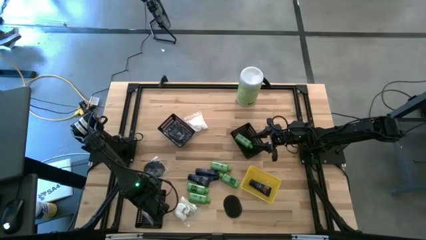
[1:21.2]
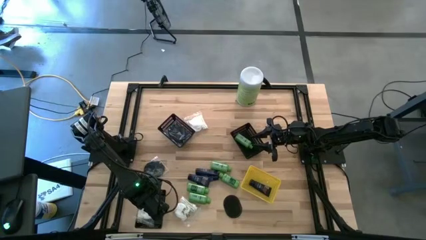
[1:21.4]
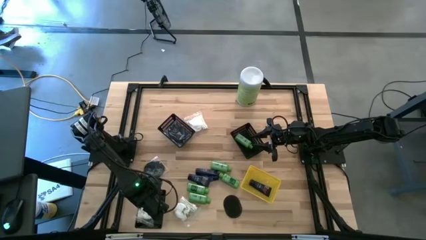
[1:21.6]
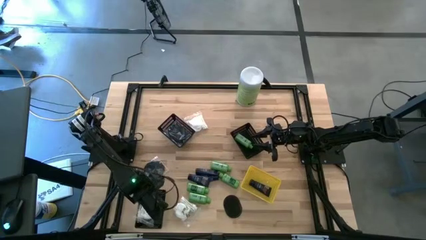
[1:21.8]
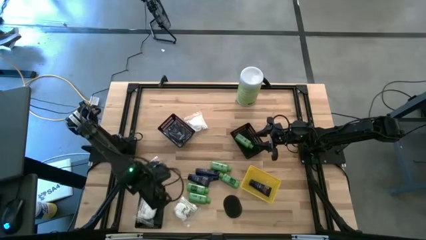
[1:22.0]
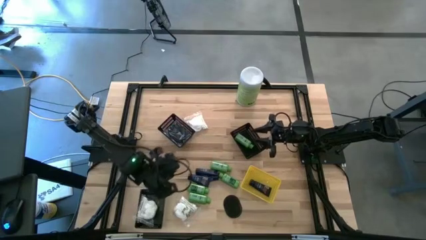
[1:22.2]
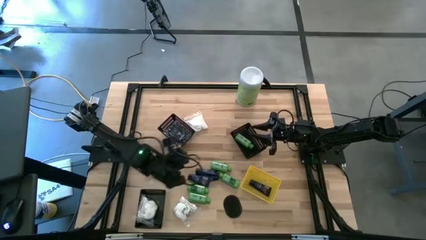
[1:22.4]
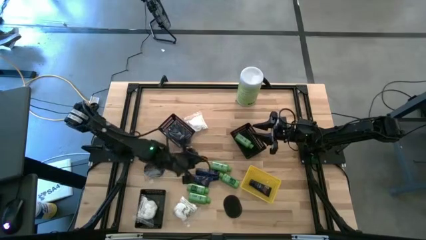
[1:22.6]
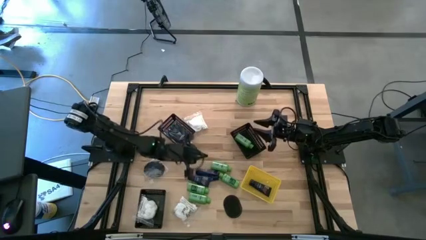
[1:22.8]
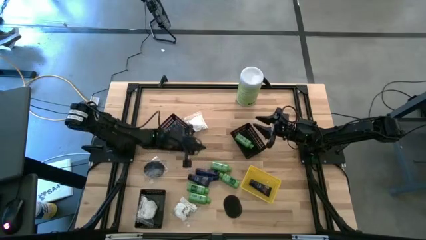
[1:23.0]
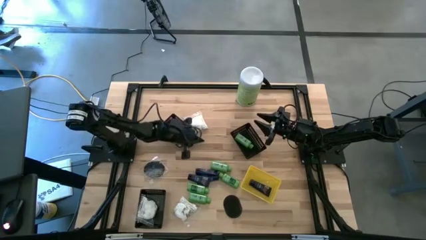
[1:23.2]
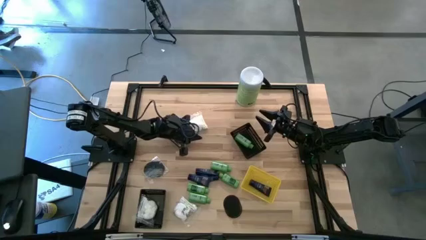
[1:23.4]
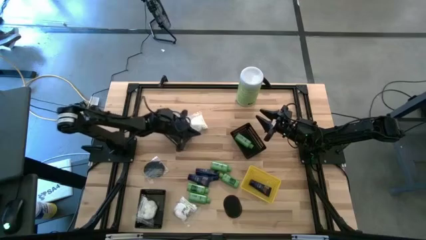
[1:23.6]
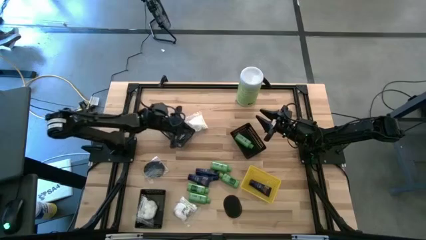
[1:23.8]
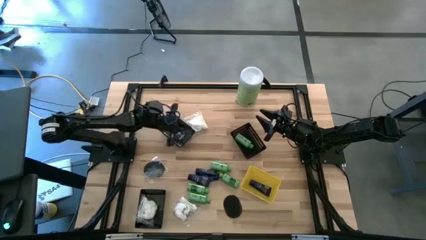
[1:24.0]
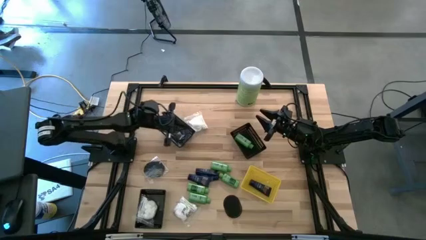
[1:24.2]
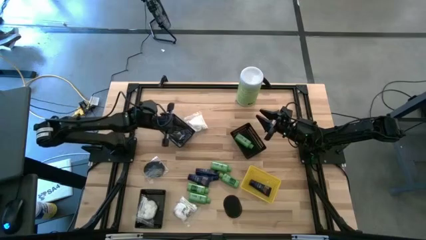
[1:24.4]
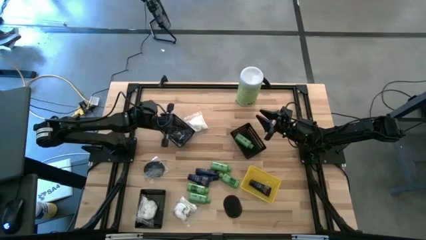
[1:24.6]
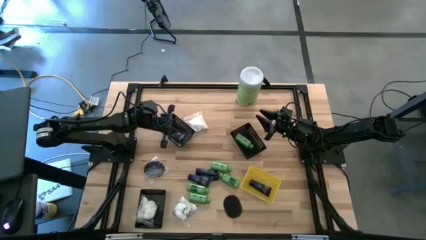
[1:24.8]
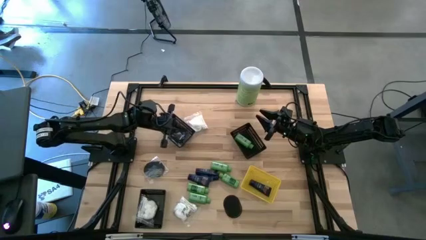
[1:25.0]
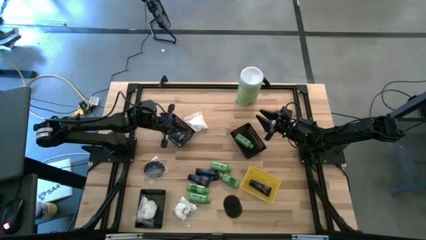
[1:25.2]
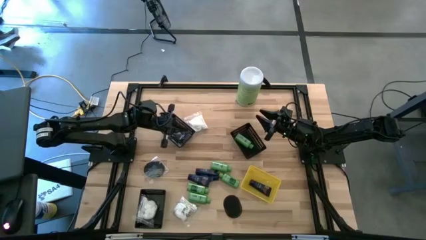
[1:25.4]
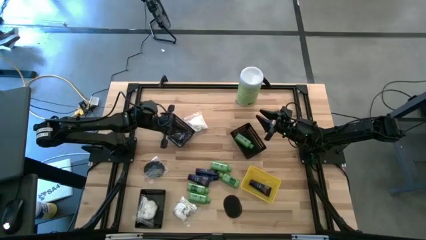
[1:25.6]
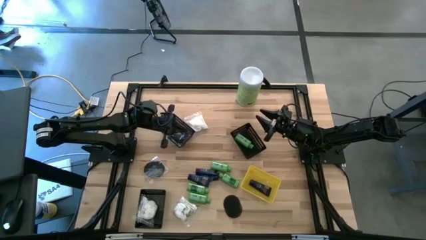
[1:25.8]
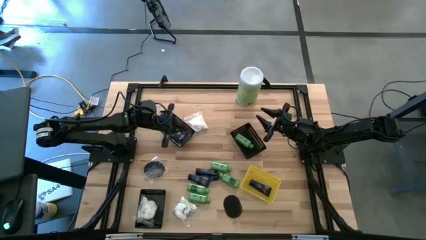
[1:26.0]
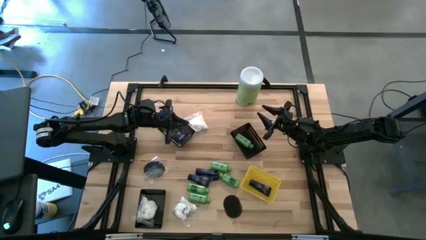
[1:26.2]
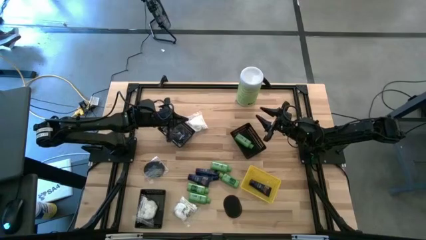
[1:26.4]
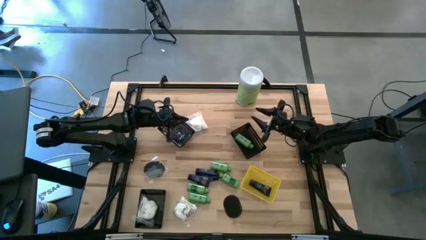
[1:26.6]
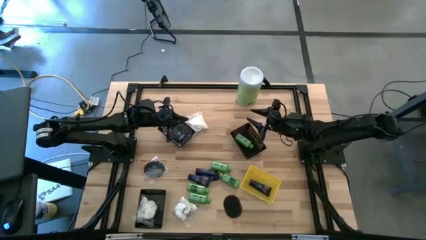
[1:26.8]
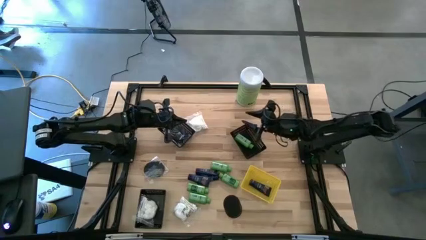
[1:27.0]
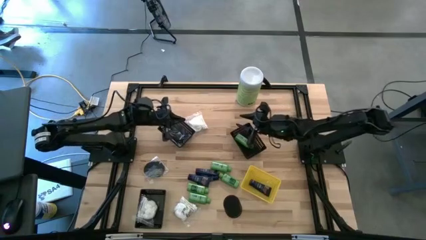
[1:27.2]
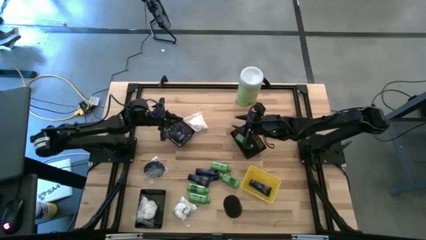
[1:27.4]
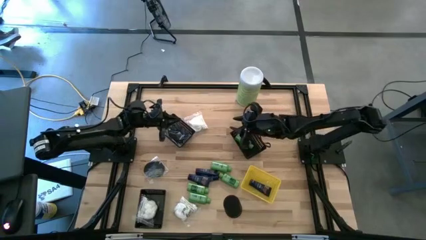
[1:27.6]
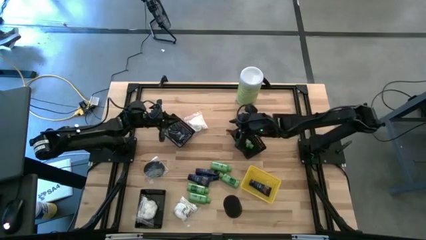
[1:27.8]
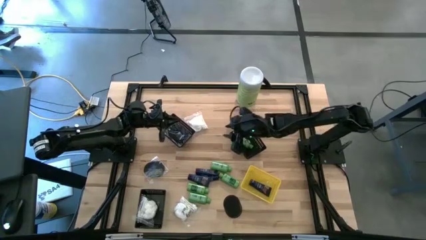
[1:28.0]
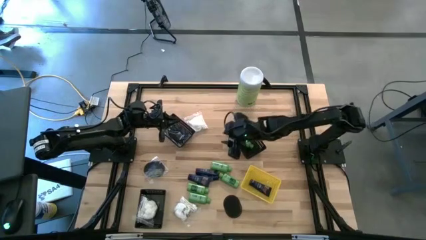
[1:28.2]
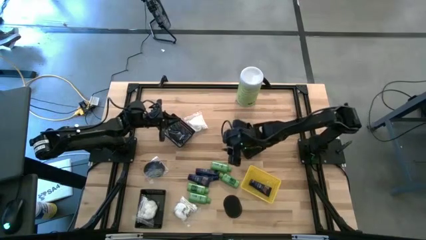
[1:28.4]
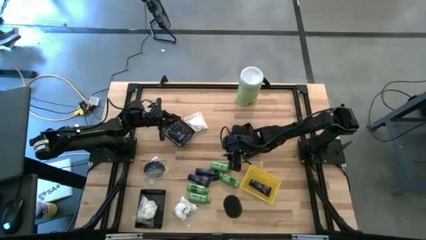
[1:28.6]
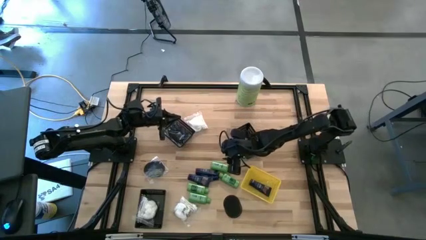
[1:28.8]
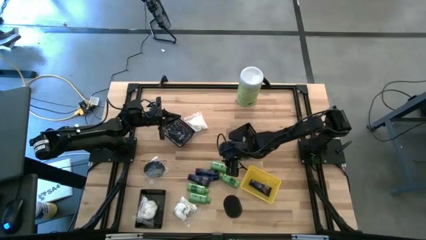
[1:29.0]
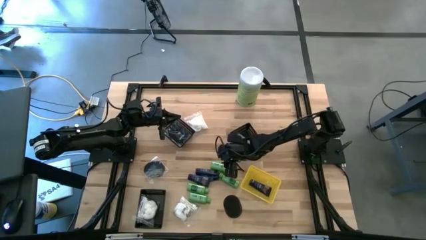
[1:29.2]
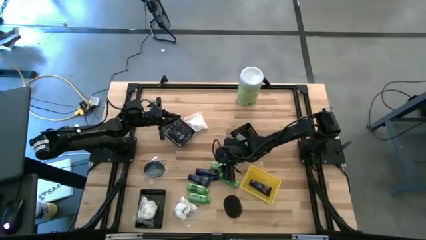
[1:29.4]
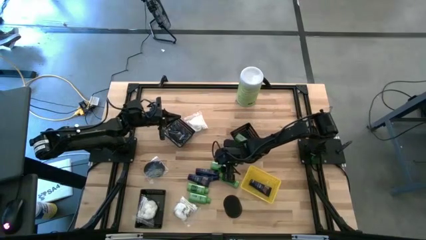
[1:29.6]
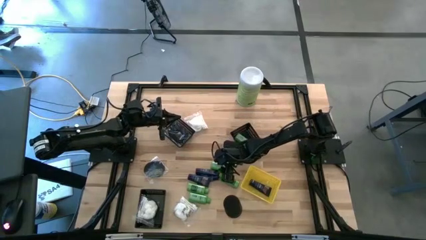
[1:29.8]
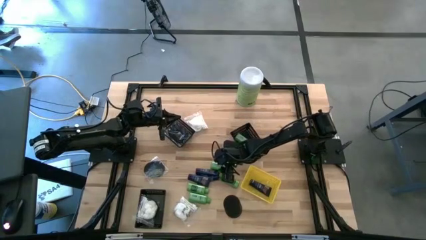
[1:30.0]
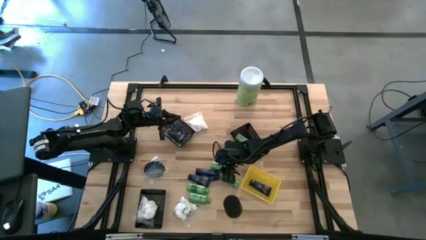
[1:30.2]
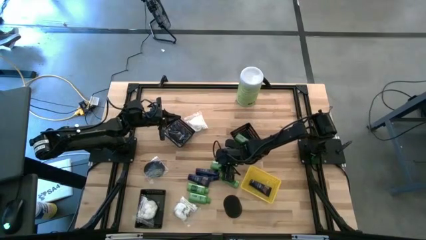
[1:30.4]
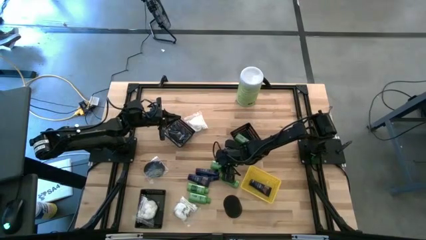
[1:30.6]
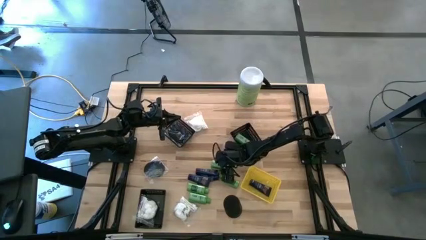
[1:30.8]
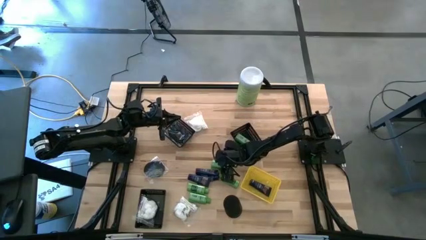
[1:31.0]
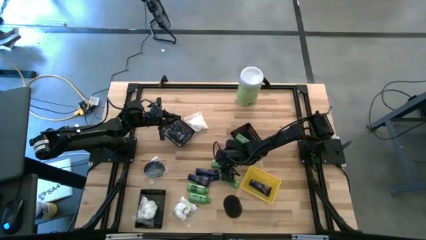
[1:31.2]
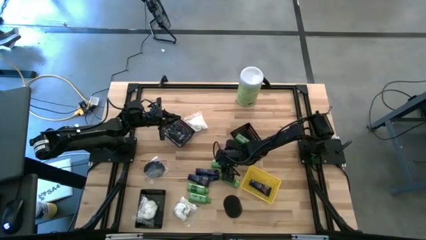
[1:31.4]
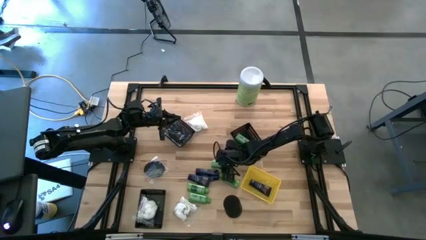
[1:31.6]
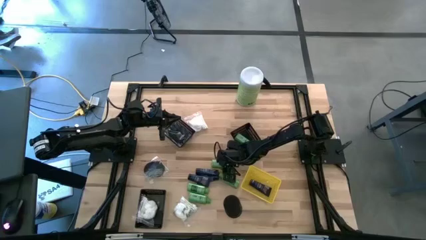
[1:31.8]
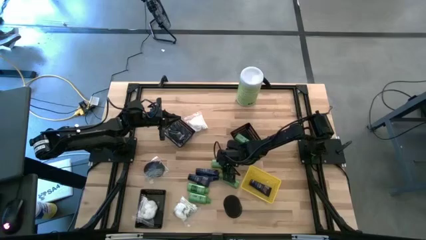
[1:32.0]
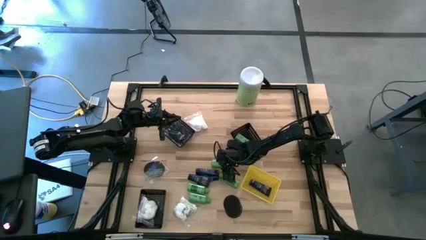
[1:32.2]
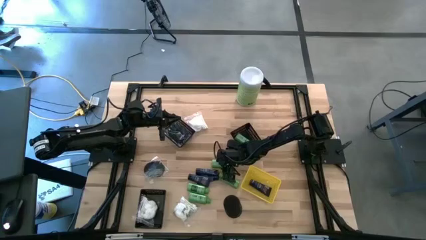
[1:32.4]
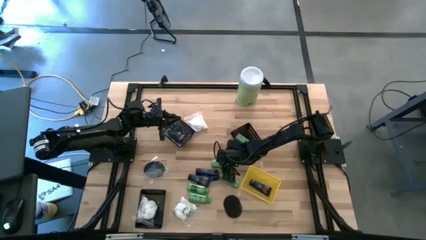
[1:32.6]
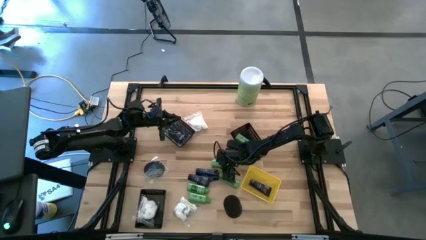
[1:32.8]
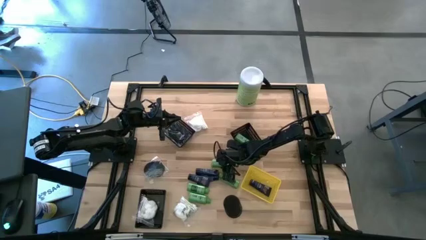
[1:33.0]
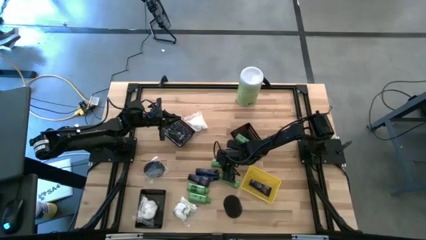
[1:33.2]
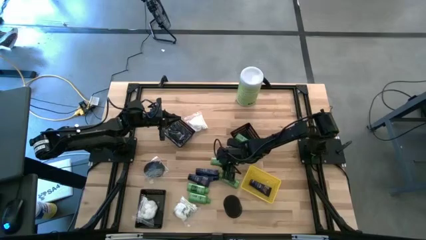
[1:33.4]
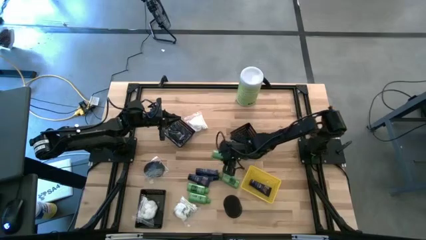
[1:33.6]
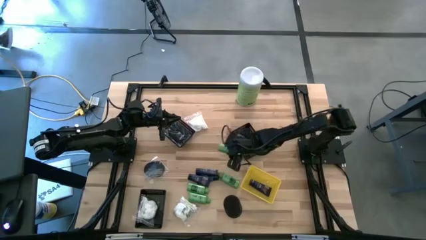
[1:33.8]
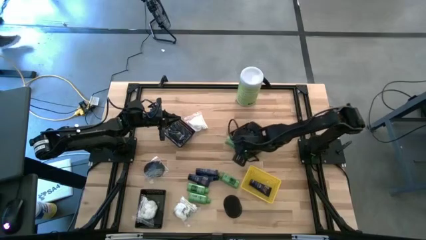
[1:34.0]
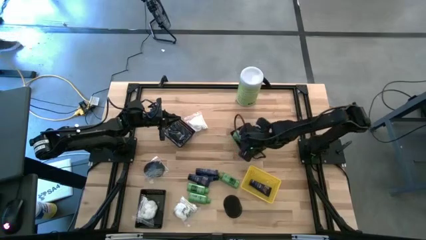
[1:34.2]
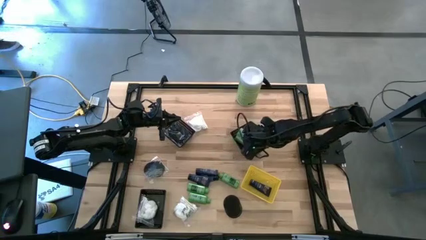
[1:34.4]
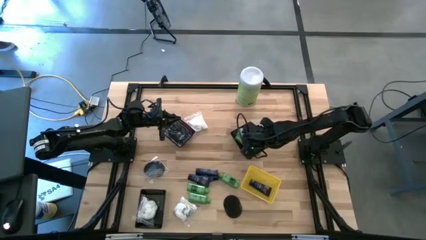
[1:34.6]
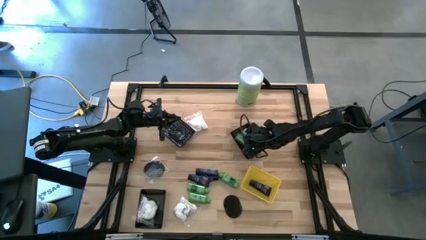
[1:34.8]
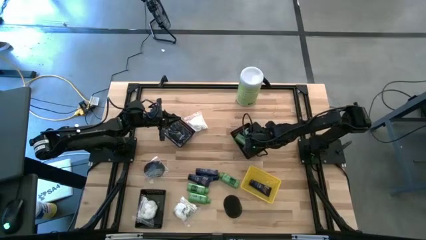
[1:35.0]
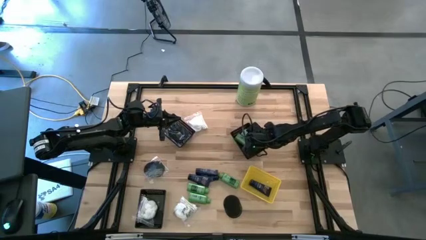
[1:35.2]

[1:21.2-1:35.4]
Task: Pick & Place Travel size toiletries
Put the shampoo bottle into the top right black bin

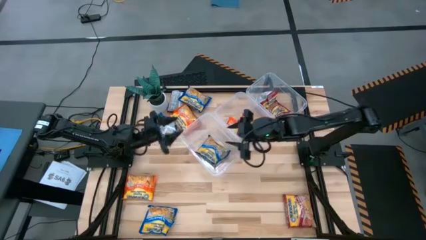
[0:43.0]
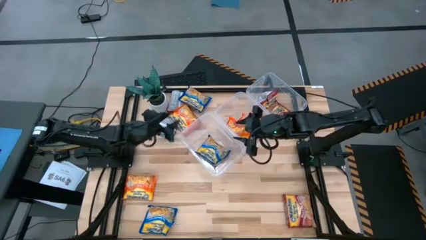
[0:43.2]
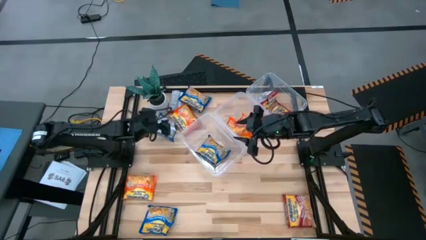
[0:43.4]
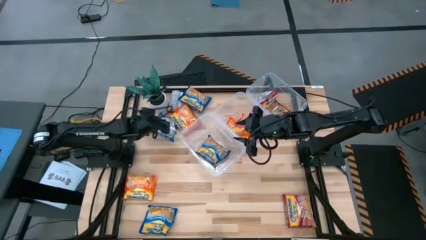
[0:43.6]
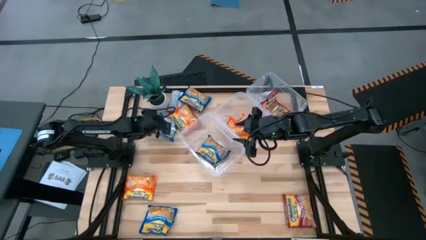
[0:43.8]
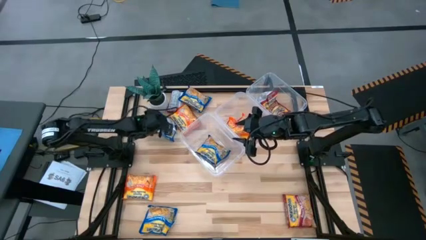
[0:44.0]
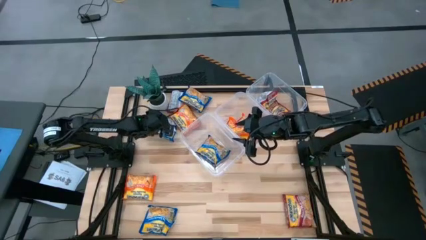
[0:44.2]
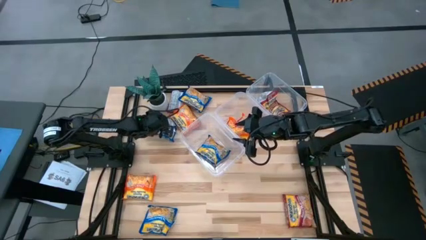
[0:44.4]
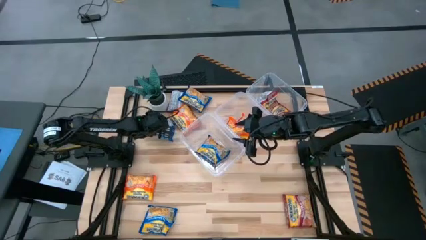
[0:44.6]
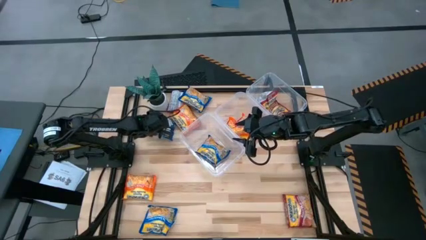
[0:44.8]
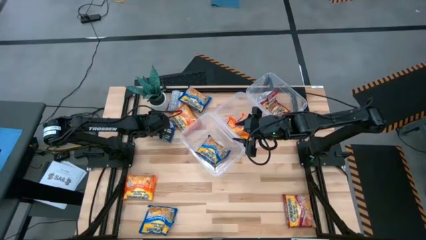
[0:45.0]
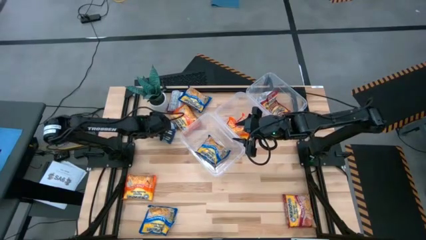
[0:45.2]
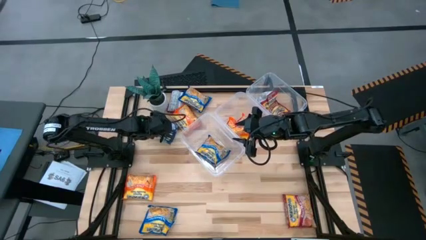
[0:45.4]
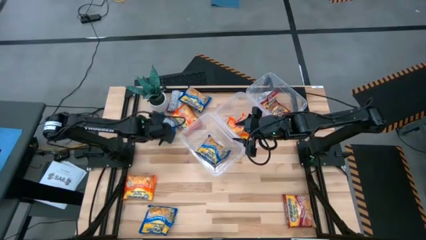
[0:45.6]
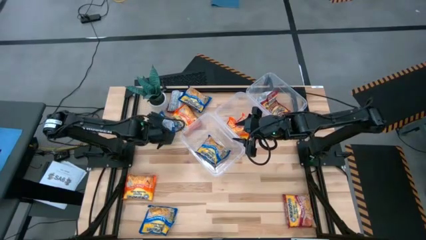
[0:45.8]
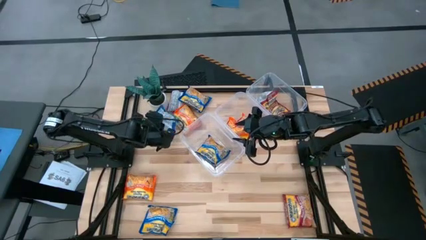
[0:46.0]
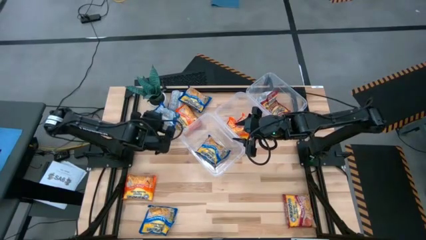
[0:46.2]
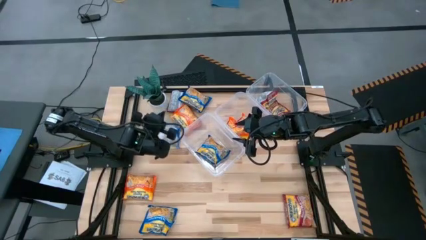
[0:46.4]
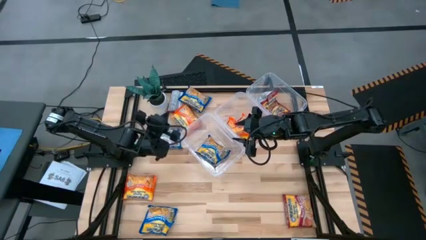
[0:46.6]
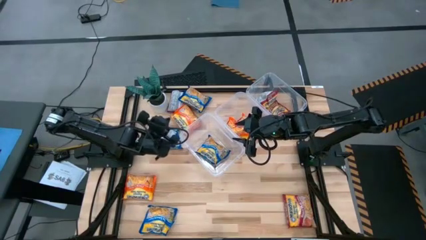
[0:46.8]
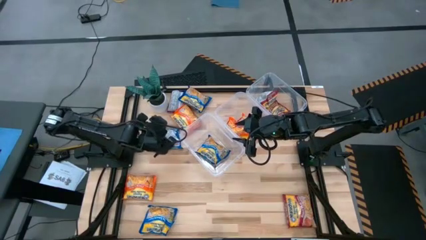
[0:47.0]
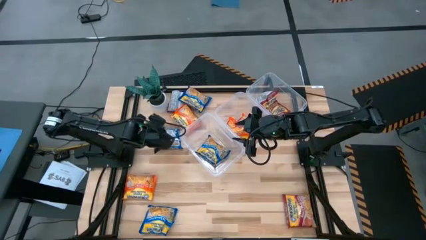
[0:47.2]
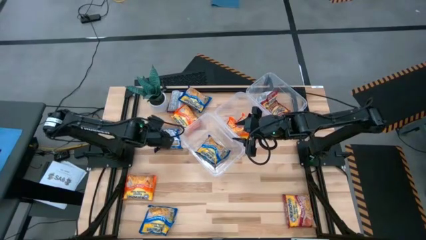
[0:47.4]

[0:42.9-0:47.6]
Task: Sort Maruchan noodles
Put the blue noodle pack into the left transparent bin
